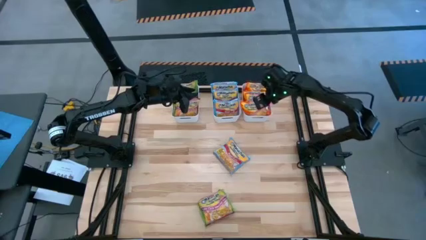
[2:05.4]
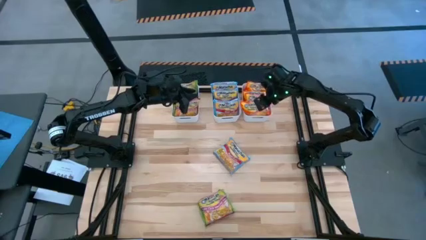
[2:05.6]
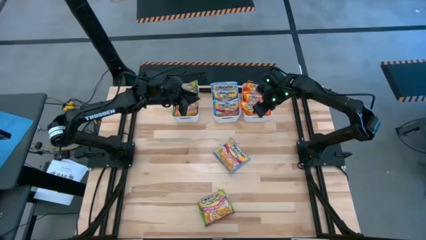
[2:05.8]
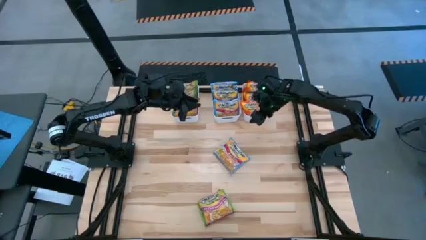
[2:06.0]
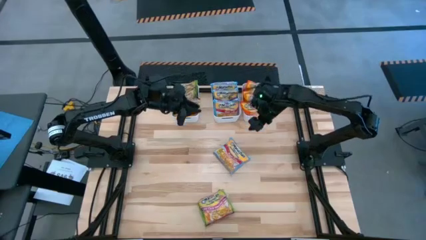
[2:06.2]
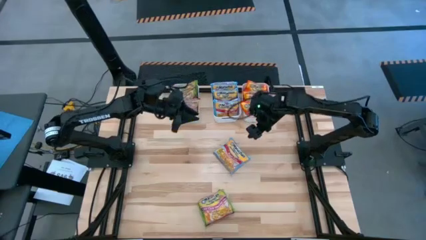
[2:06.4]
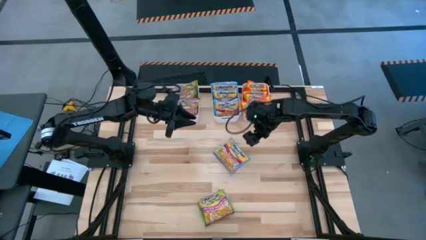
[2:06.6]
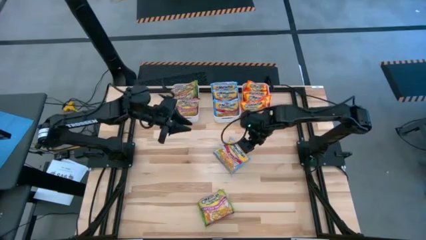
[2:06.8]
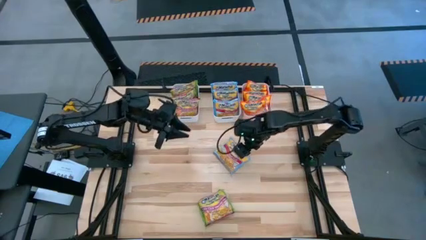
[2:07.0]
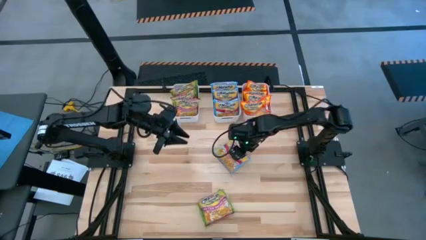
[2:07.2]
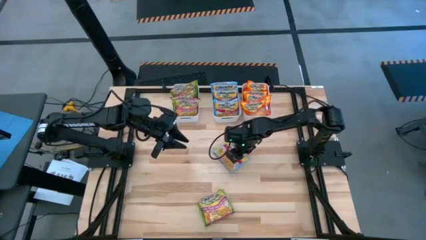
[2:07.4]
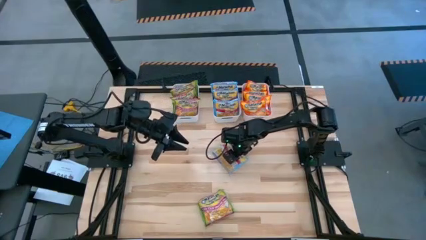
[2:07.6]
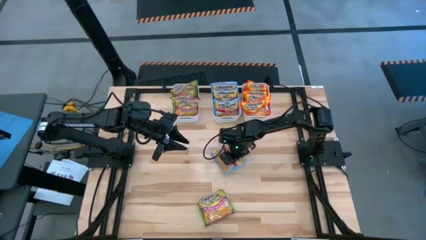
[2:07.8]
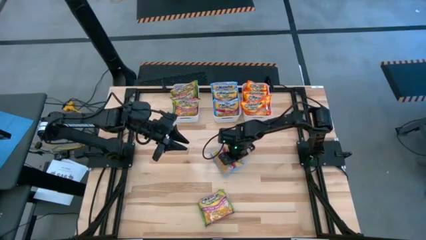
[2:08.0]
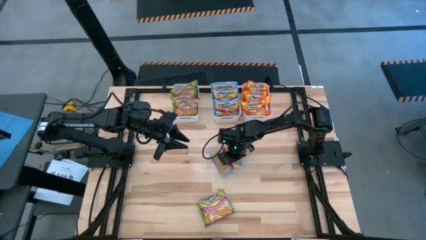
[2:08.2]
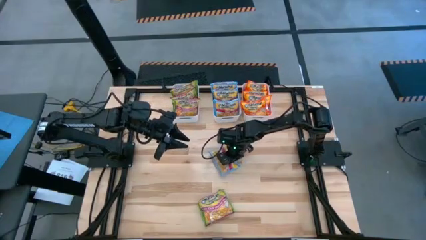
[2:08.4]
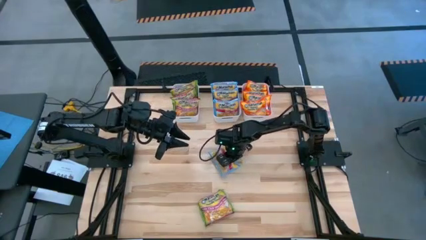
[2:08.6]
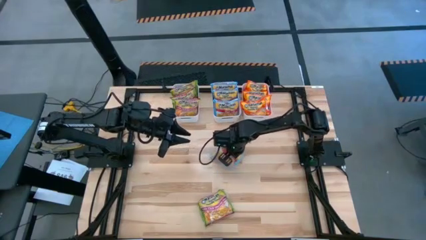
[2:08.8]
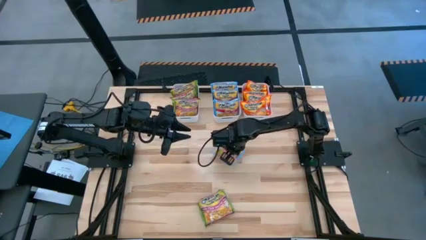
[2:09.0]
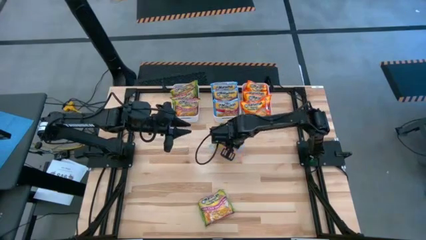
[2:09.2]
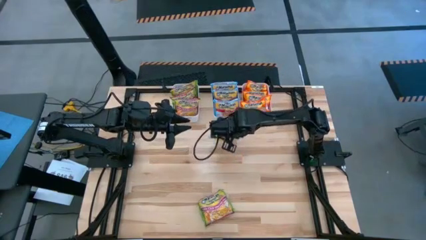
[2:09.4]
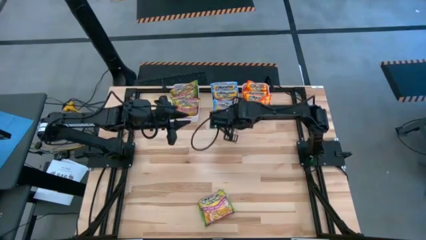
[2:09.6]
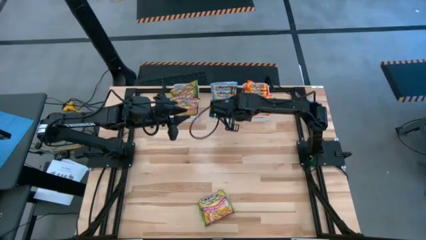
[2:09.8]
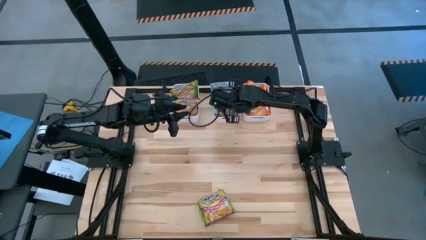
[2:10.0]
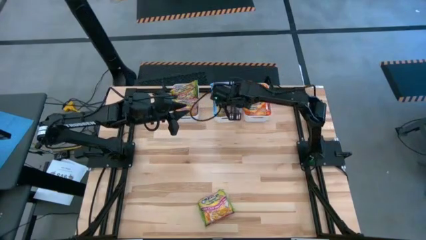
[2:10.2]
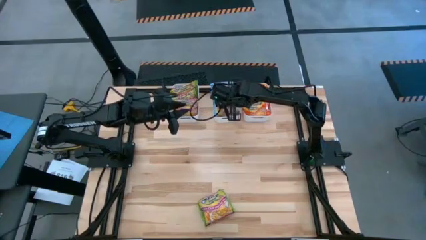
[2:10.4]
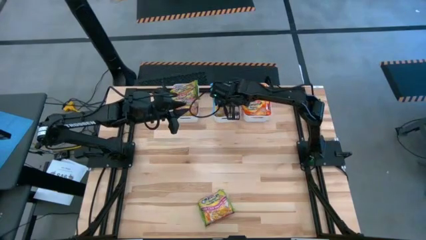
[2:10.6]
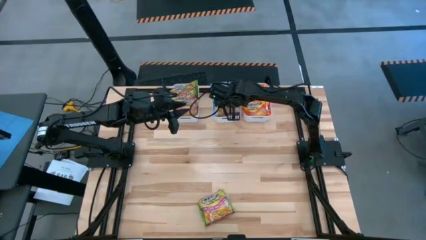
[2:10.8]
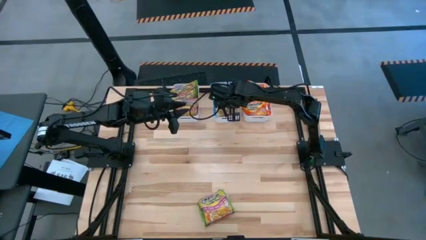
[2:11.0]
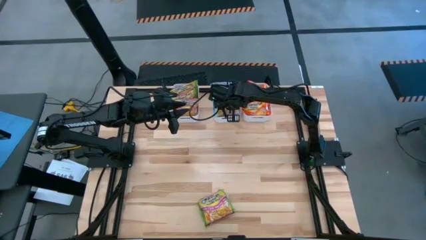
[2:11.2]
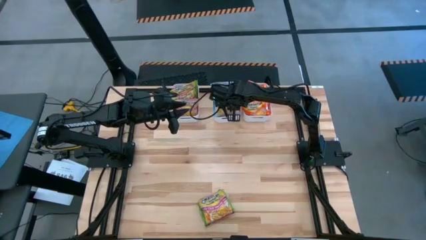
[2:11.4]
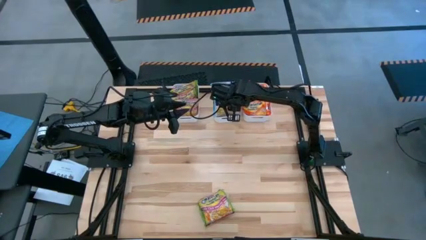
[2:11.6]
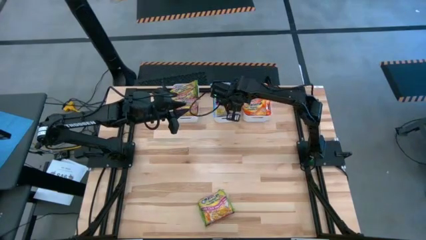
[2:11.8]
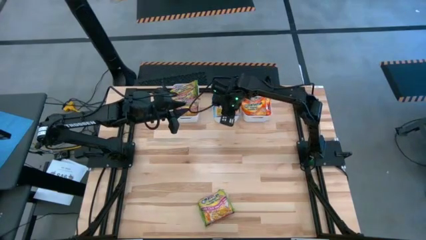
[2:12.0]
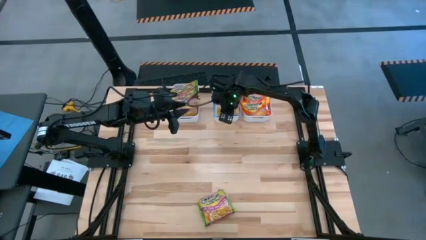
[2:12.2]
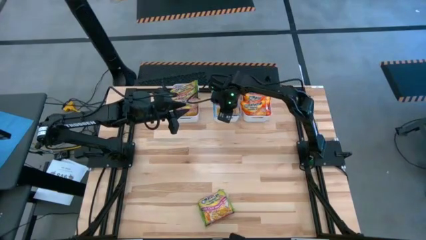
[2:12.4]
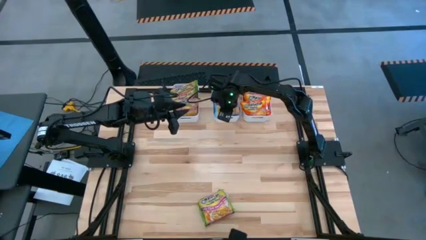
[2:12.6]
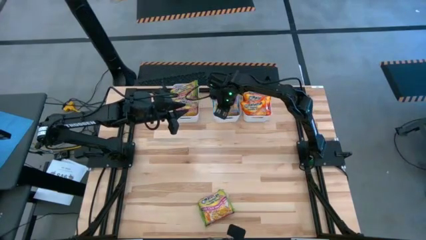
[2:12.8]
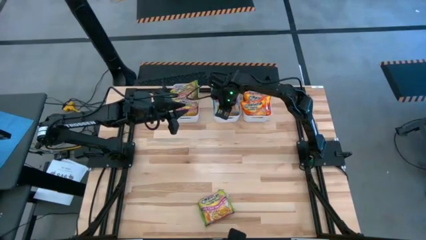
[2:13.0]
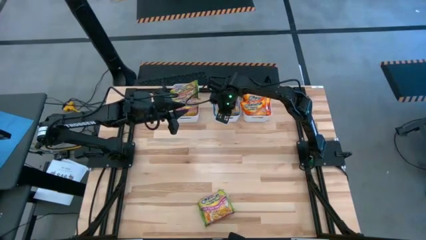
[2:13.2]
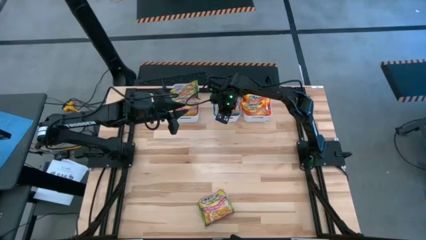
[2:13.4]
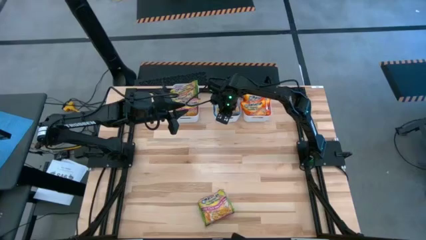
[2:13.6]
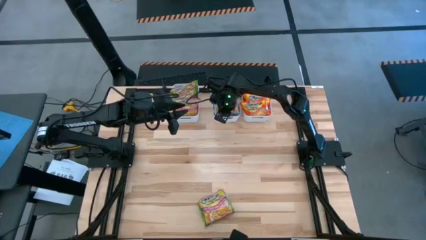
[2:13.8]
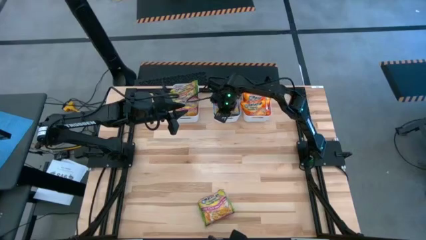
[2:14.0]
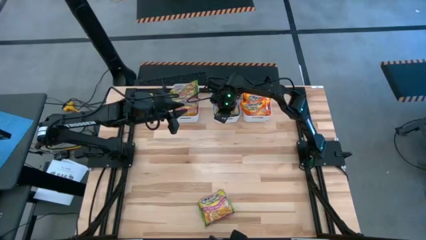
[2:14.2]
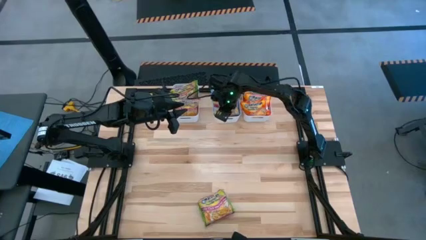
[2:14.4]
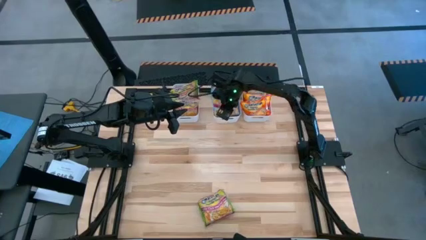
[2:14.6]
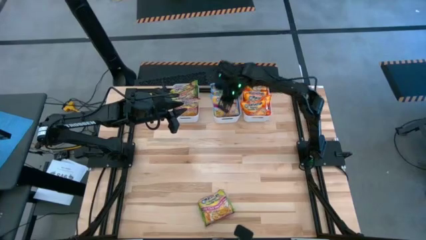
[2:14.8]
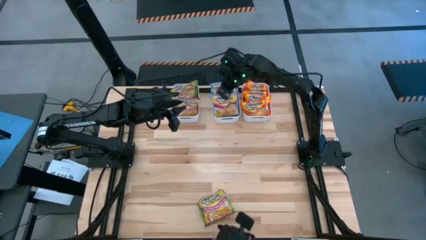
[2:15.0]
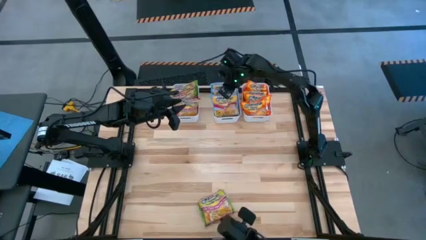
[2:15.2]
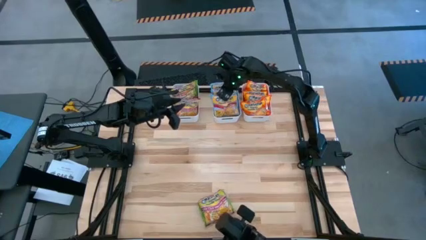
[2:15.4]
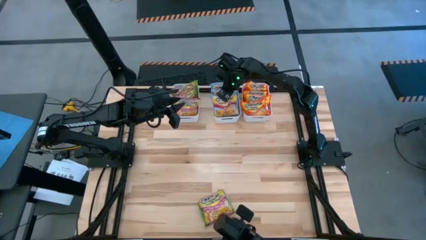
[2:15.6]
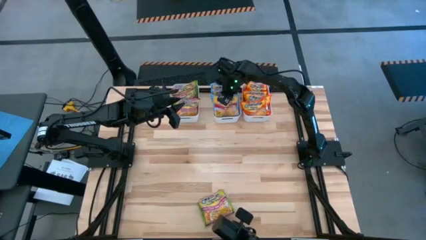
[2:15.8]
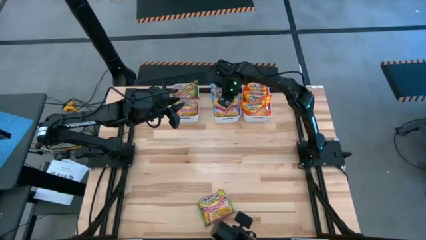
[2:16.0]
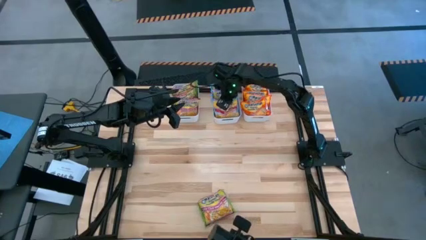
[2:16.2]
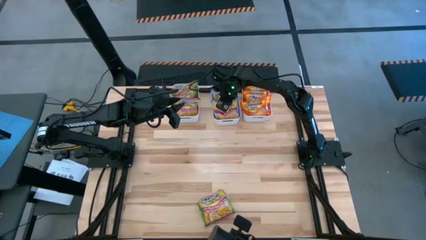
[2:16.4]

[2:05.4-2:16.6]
Task: Sort Maruchan noodles
Put the blue noodle pack into the middle white bin

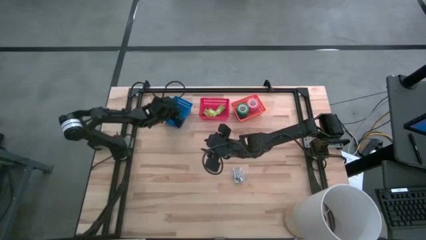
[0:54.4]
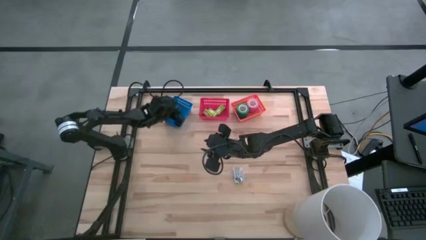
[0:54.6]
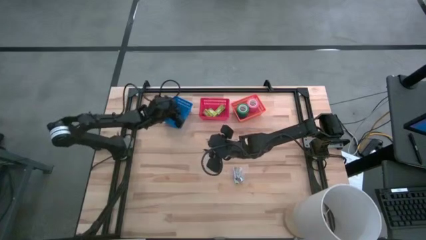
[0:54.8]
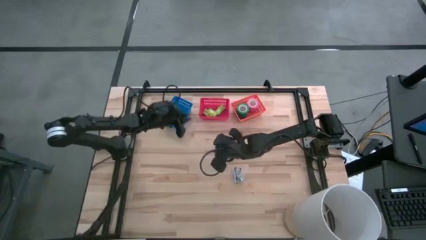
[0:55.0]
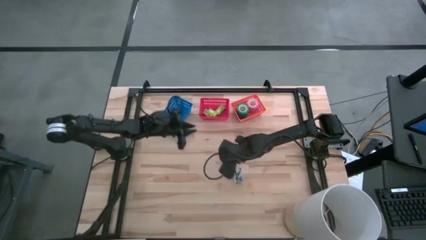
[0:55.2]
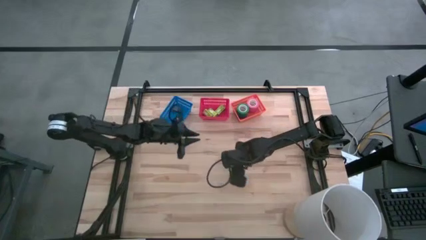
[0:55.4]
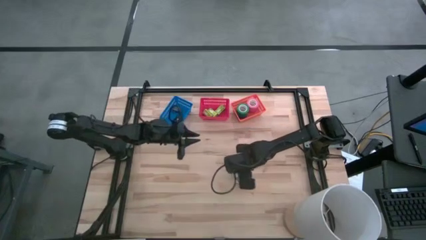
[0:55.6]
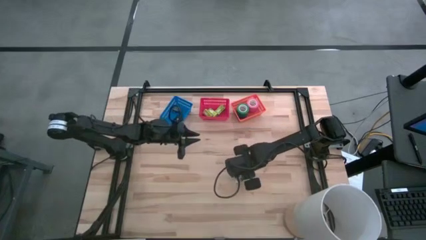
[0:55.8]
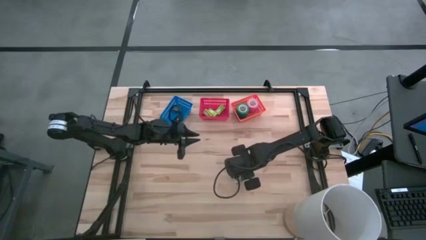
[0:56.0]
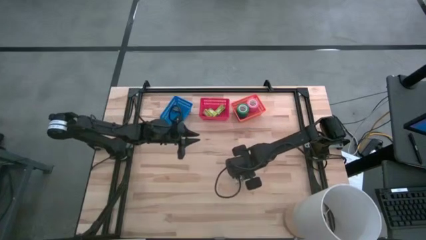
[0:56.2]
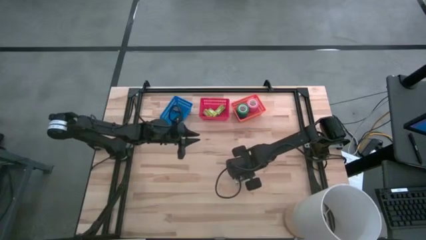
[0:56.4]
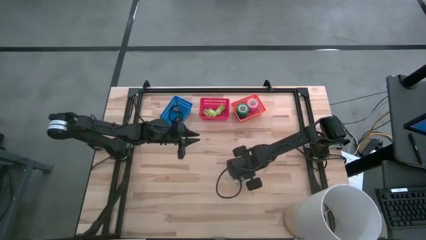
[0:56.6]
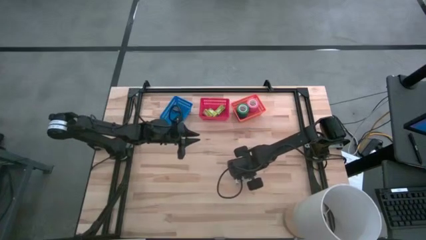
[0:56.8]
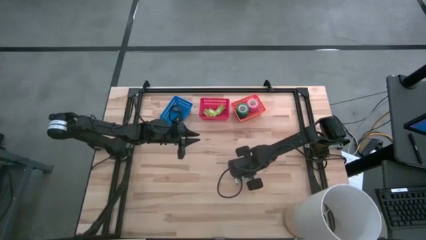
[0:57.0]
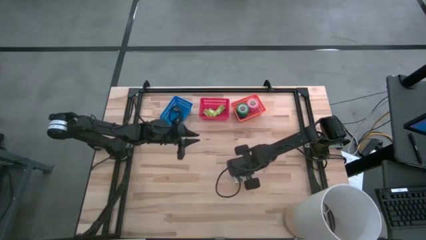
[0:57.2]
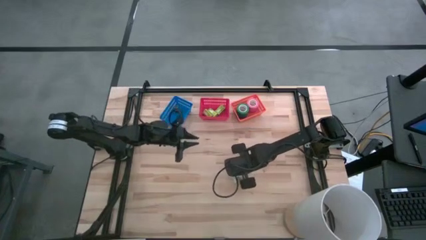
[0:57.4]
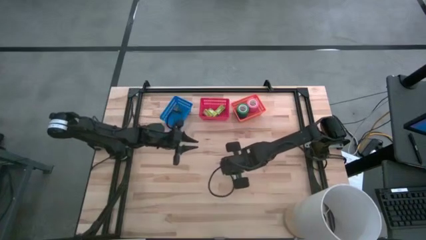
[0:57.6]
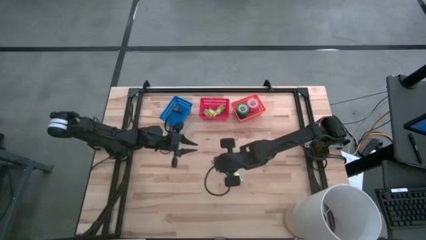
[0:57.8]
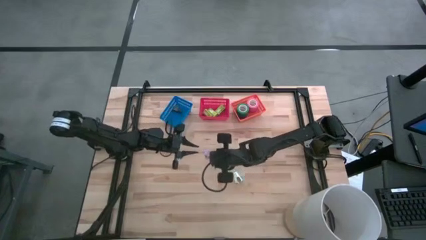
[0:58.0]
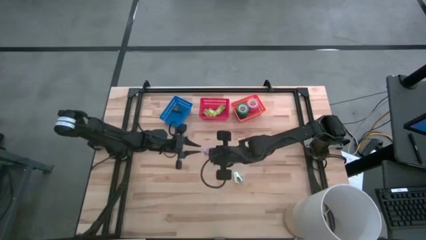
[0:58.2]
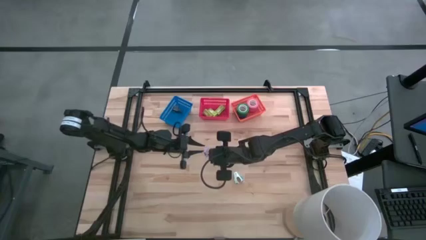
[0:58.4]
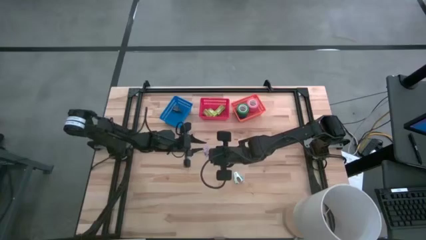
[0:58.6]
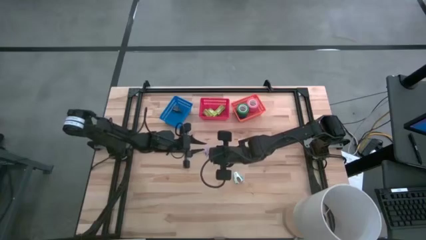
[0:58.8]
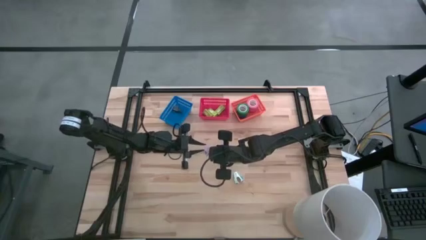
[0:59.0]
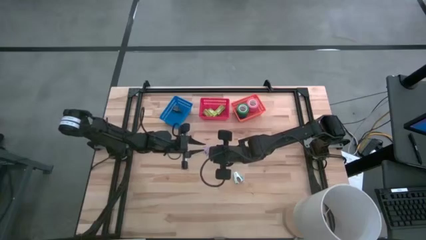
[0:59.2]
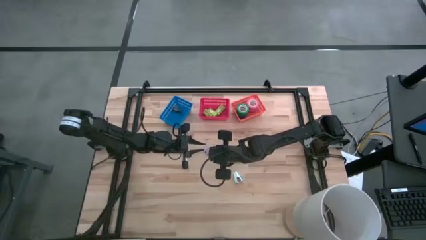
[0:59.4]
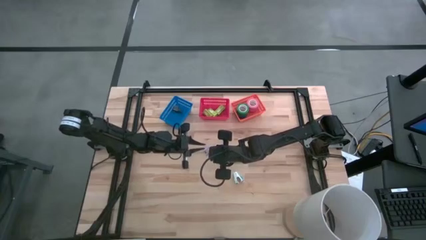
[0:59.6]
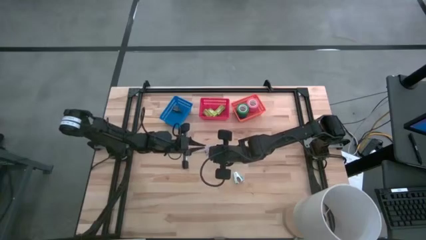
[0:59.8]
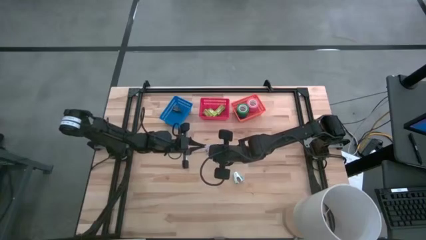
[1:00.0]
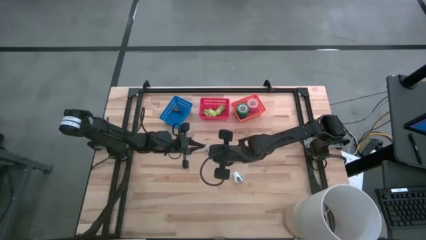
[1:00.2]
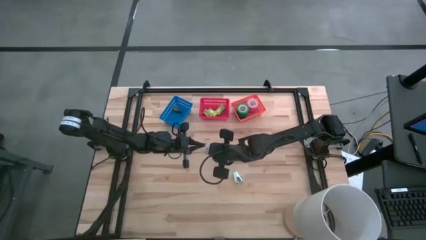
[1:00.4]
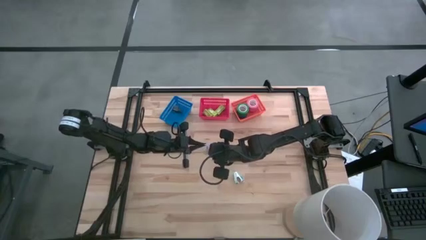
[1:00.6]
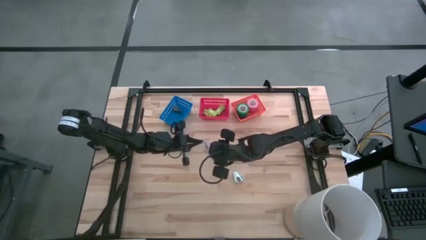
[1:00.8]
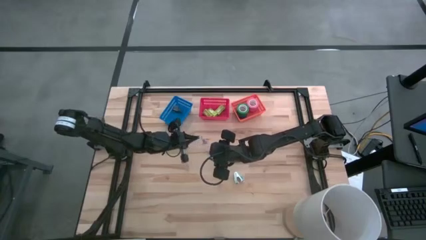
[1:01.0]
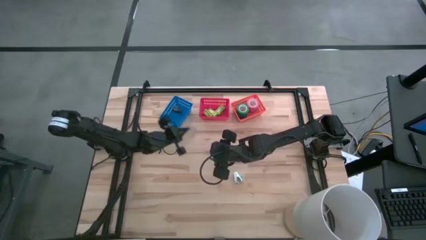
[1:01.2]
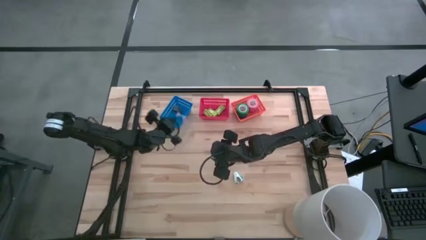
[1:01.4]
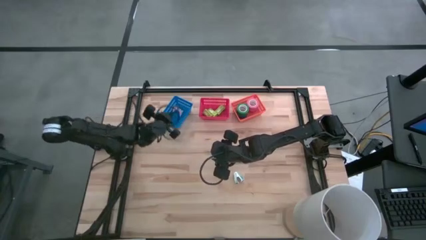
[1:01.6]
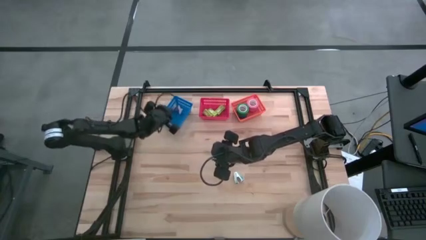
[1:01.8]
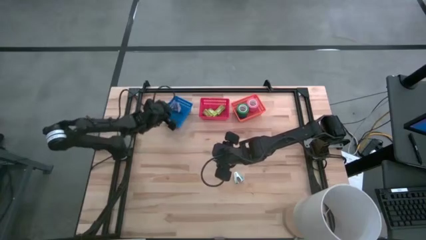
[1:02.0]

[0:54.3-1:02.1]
Task: Pick and place Stapler, Stapler remover, tape
Put the purple staple remover into the blue bin
